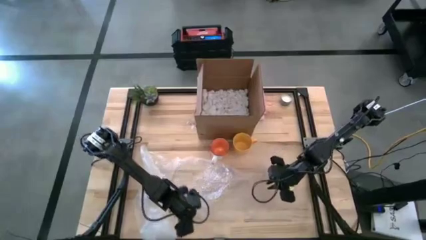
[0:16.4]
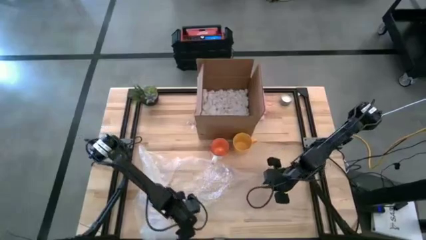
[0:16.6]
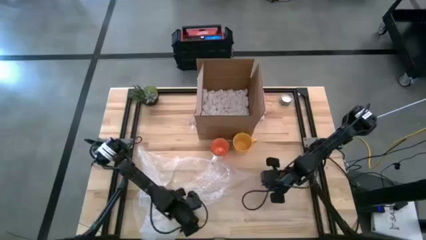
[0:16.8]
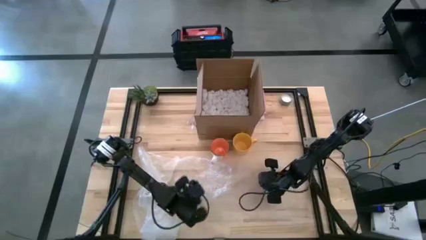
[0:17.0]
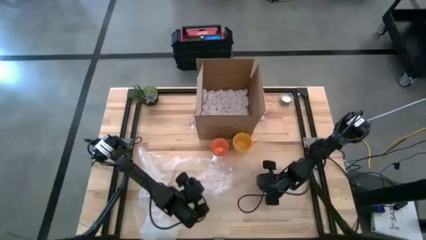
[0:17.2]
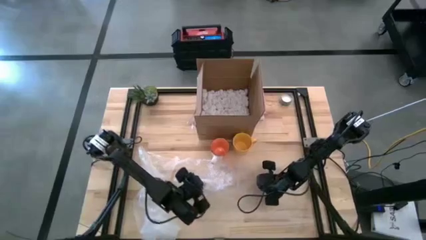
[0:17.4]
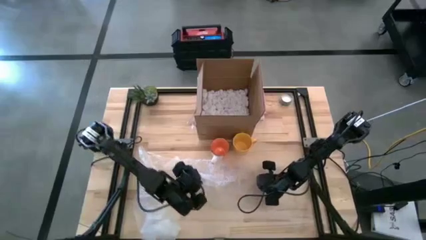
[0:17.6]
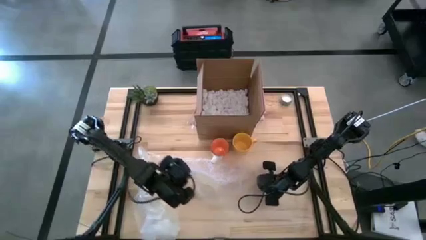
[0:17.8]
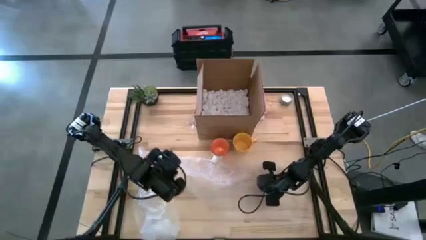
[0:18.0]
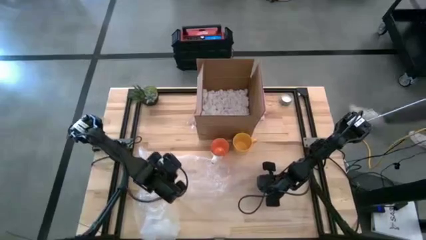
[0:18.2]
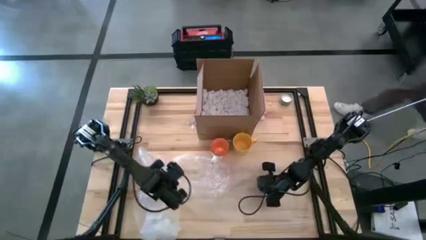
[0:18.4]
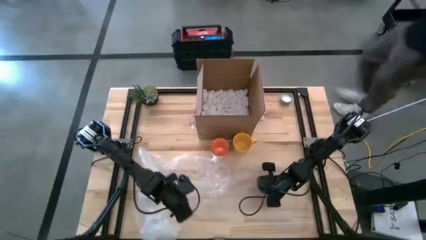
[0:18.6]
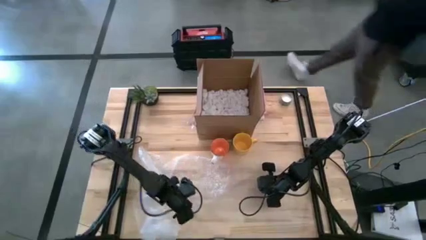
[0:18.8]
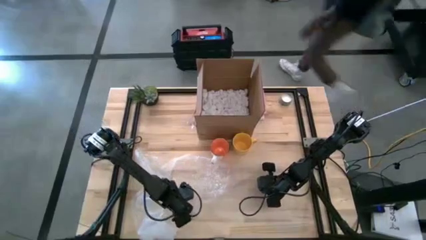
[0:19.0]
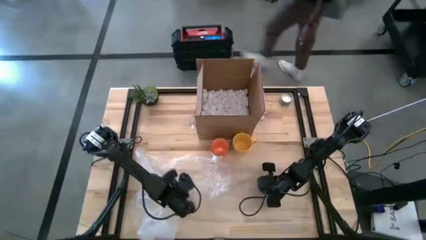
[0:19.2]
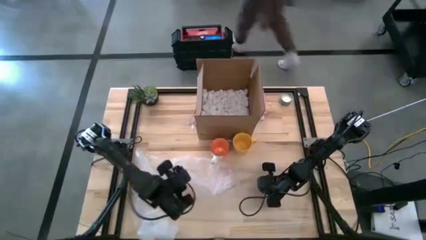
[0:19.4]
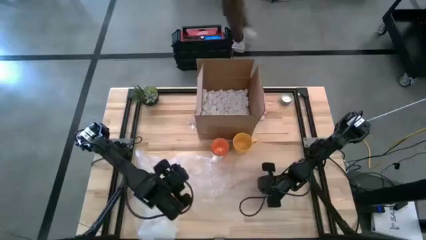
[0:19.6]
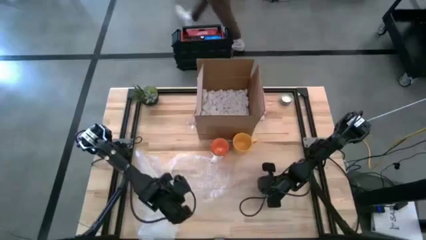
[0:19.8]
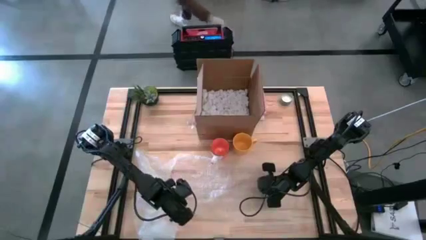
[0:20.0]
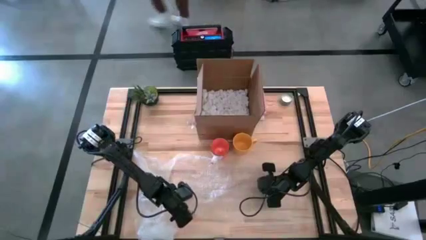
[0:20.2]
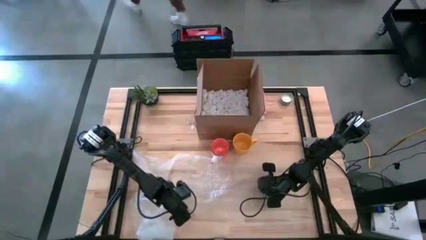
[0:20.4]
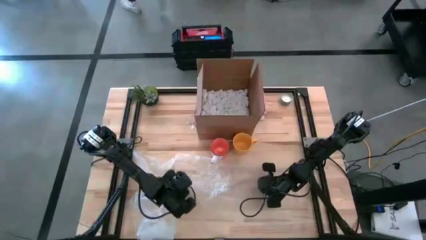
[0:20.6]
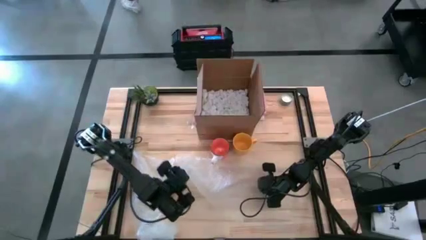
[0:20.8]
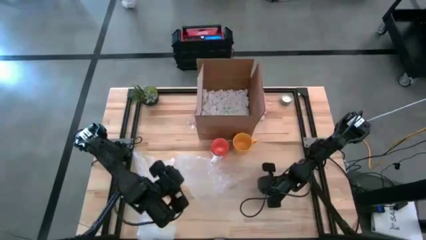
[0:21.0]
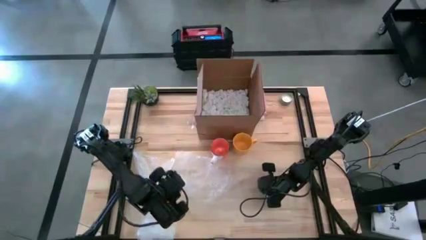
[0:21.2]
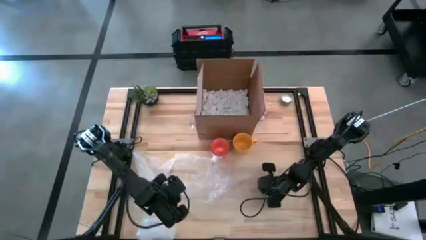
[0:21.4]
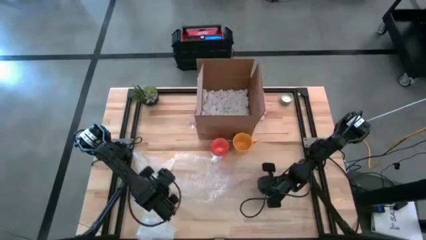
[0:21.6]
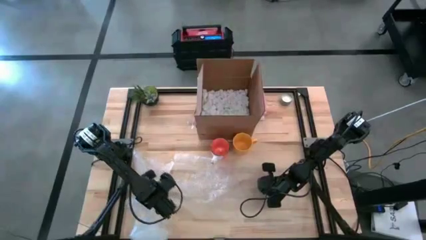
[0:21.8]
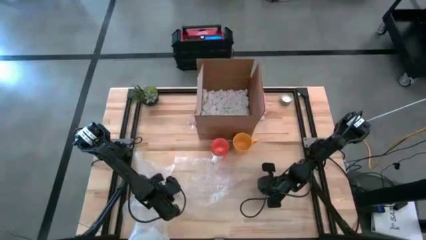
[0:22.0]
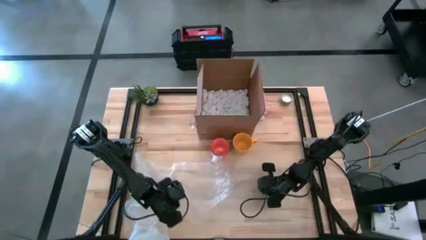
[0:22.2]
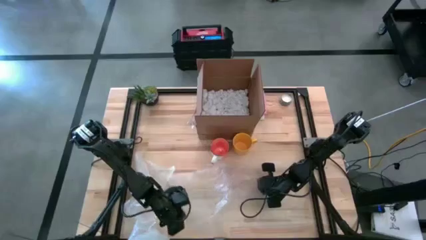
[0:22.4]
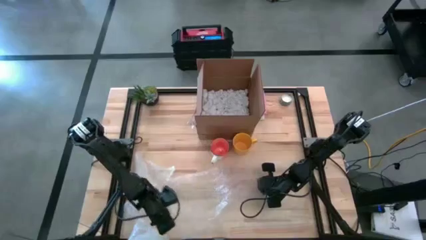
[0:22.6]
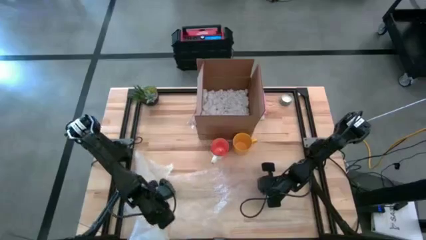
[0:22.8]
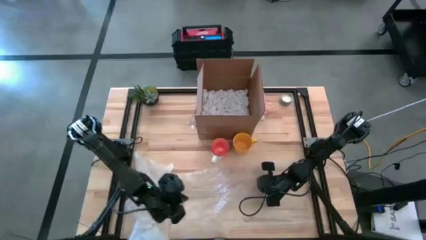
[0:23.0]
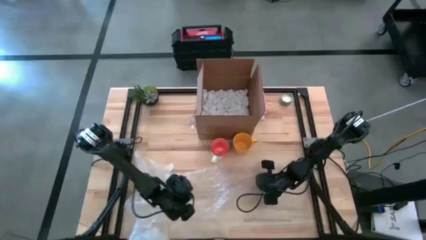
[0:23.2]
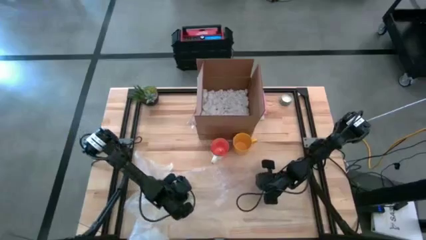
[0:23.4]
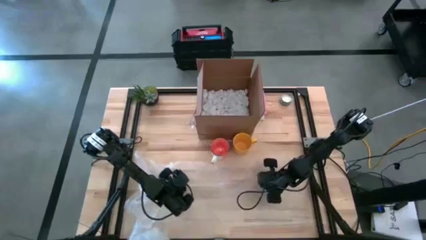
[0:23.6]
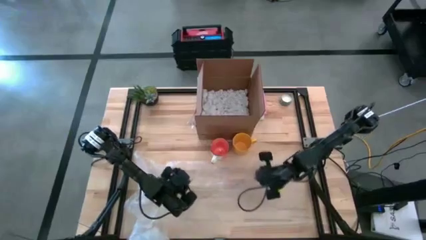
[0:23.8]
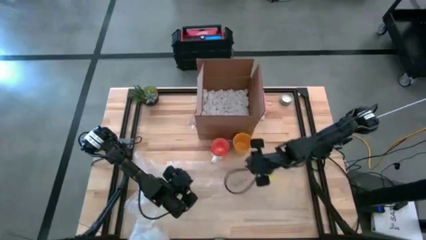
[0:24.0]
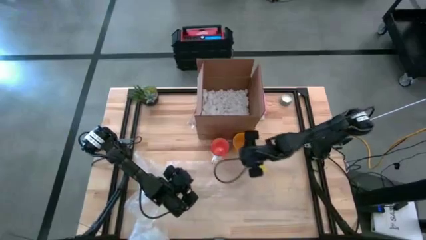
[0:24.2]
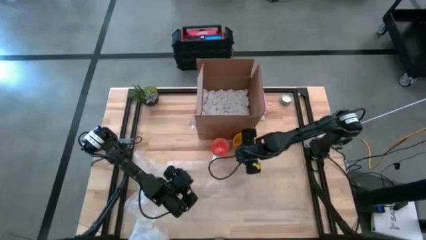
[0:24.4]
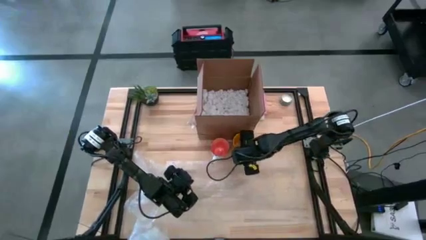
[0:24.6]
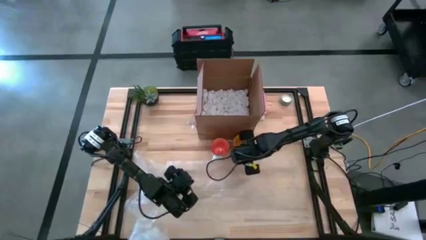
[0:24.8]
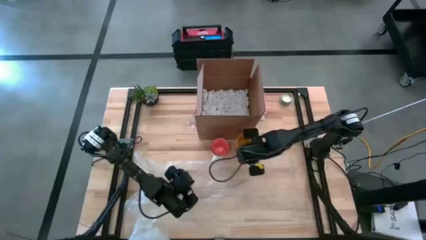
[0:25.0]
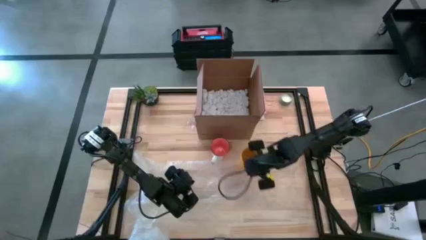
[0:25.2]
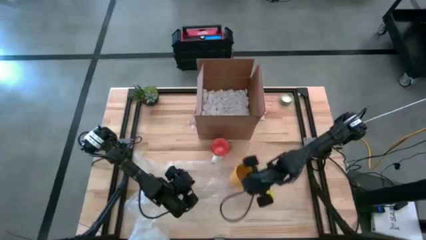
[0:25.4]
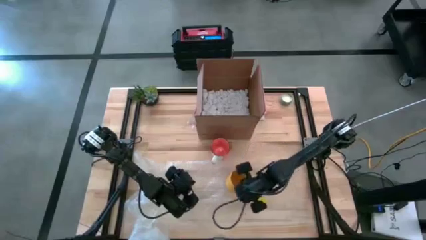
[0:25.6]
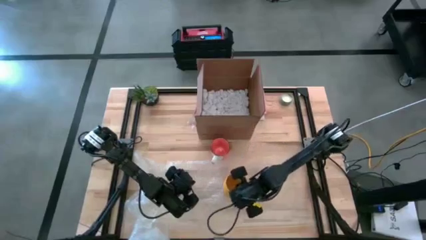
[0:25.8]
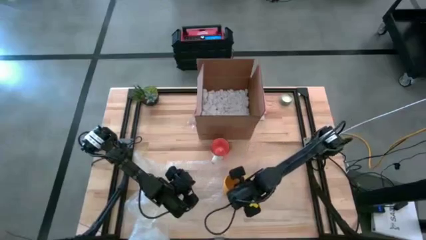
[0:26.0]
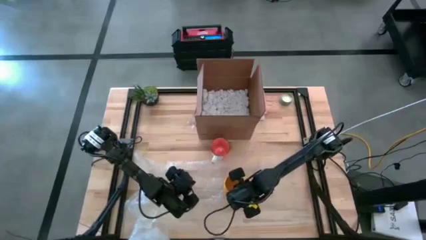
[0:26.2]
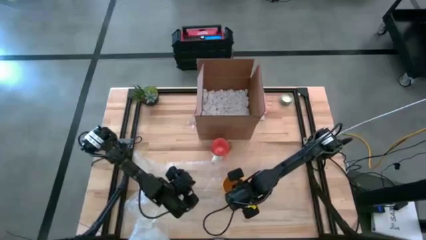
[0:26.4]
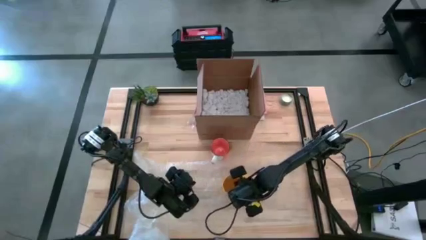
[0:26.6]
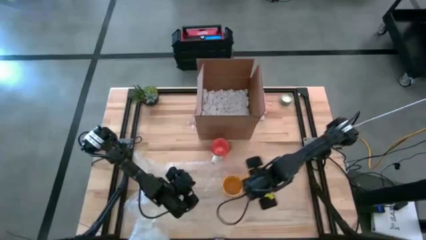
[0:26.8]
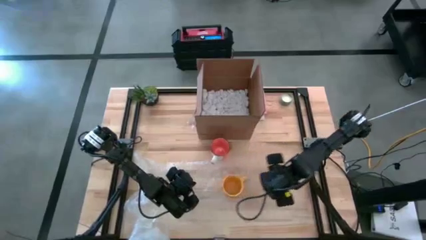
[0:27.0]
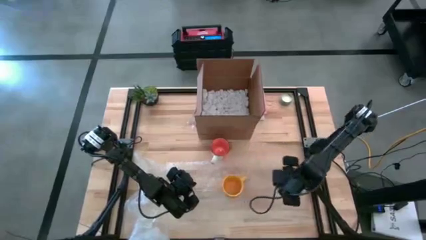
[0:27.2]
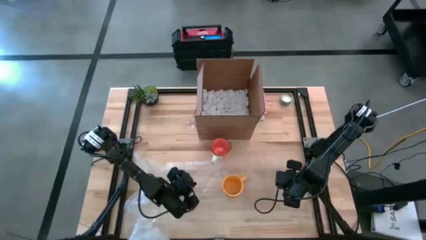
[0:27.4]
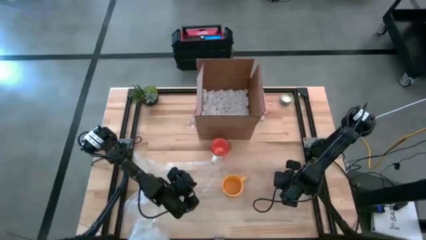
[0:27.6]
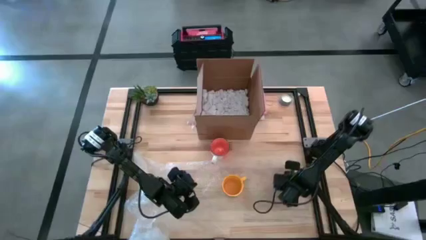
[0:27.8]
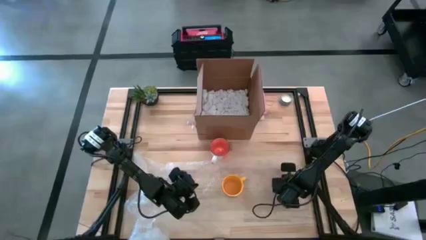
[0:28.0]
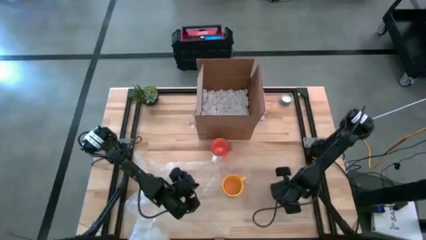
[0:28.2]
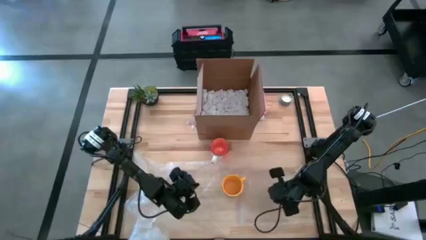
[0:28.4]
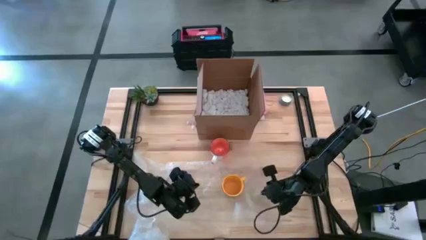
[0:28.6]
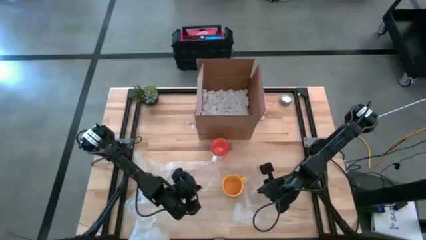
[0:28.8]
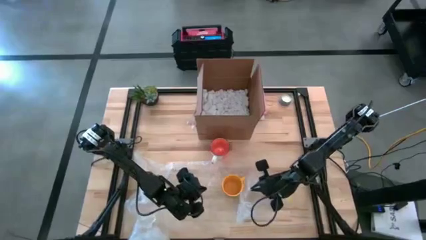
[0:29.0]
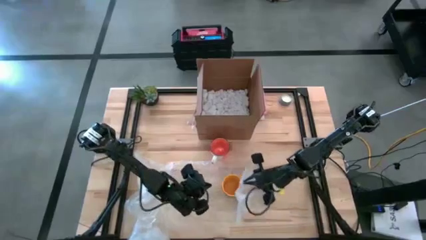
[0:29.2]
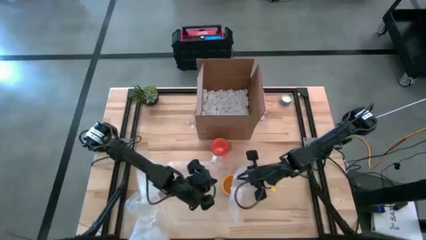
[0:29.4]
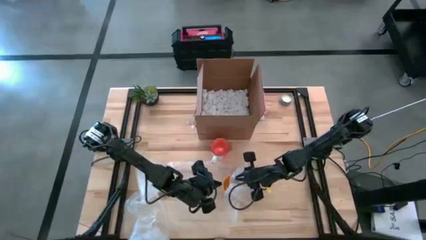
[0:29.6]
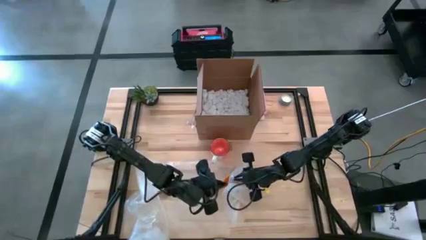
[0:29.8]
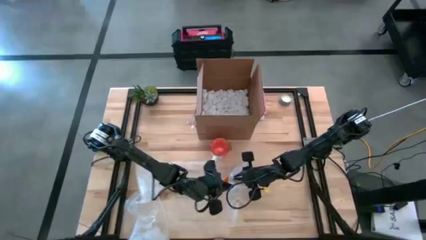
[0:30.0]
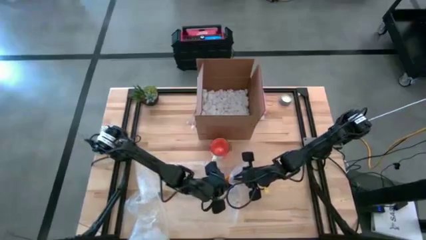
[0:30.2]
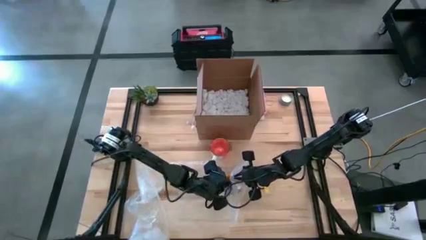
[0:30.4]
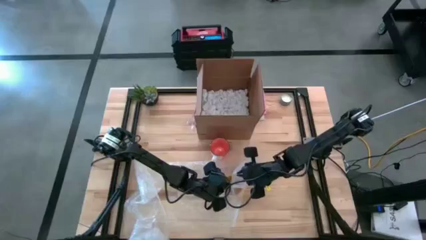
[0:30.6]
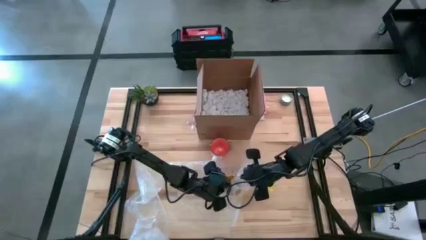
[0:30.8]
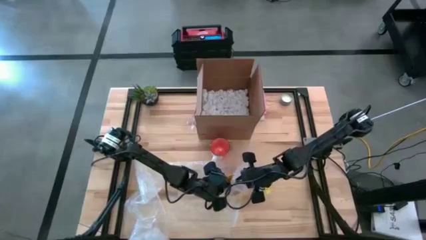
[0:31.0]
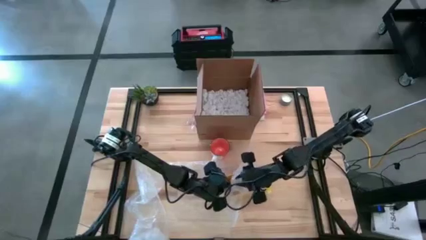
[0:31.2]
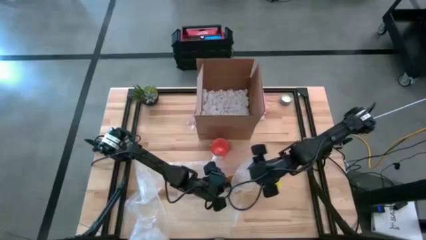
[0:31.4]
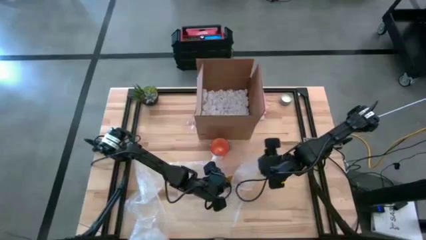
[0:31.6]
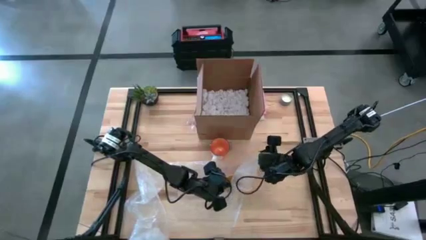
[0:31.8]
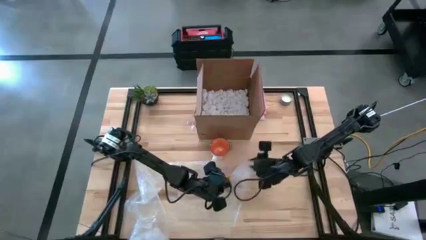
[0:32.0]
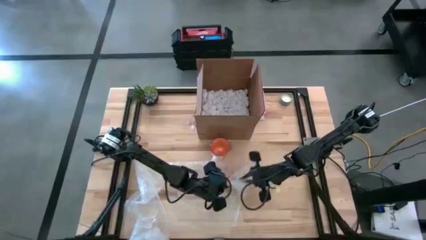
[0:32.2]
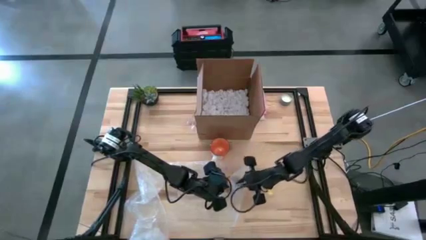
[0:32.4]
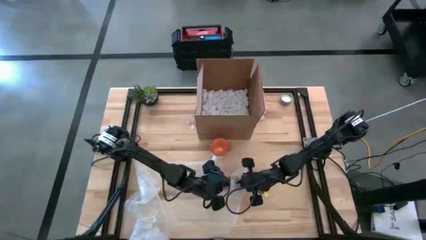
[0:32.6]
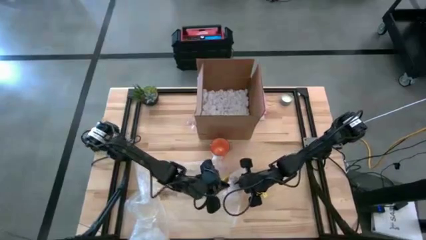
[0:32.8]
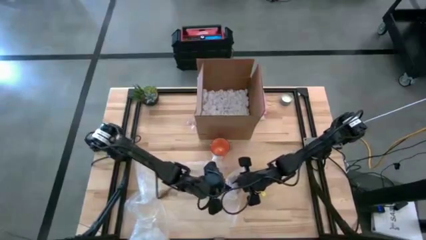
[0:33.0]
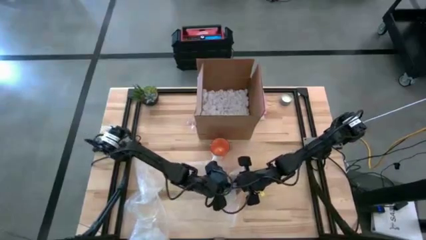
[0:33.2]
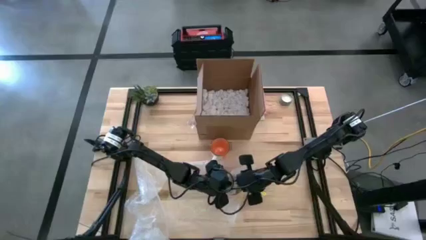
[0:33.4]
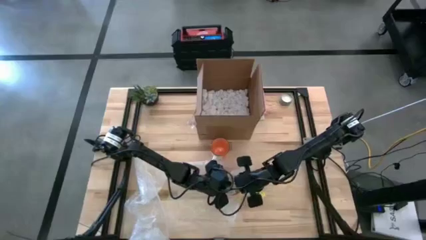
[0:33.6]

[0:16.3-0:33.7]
Task: wrap mug
Wrap the yellow mug with the transparent bubble wrap
